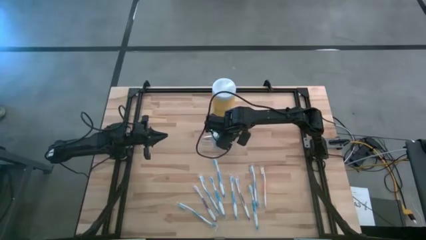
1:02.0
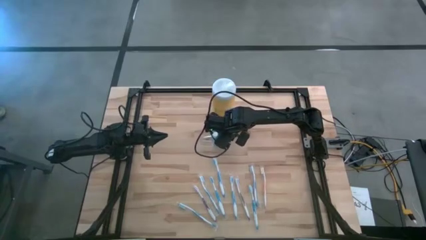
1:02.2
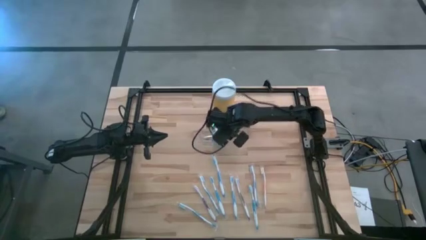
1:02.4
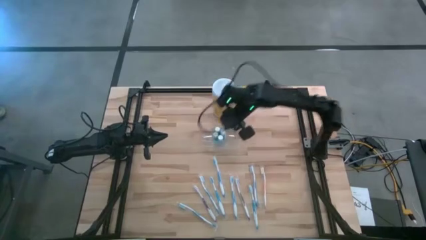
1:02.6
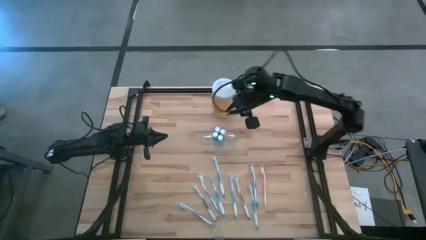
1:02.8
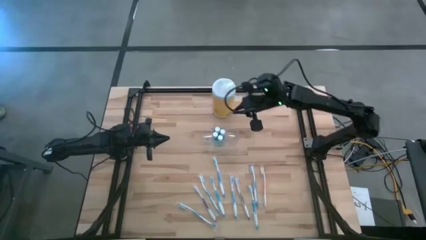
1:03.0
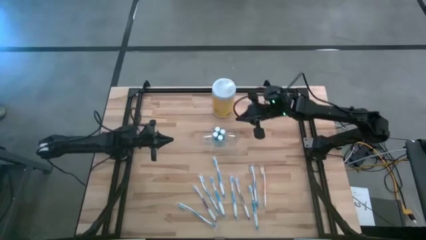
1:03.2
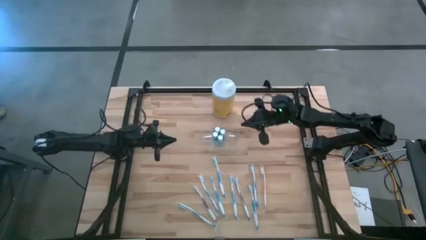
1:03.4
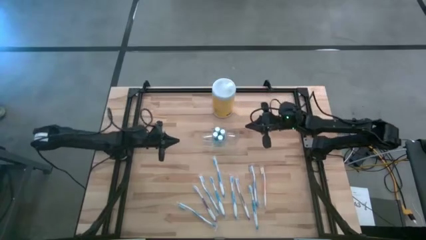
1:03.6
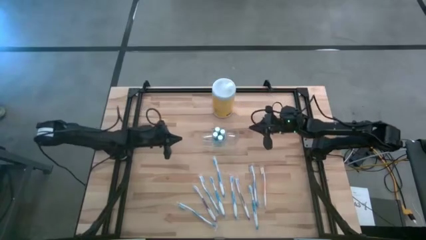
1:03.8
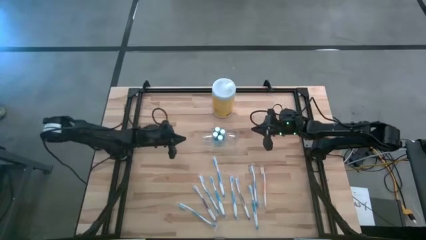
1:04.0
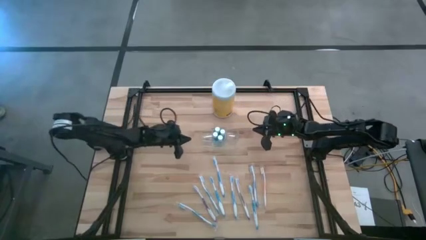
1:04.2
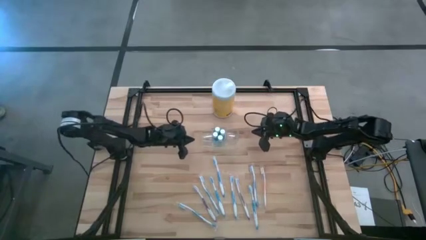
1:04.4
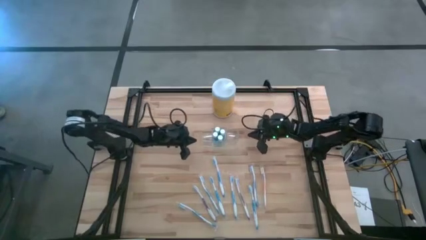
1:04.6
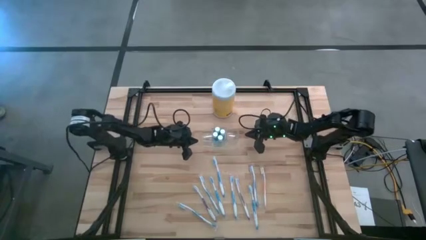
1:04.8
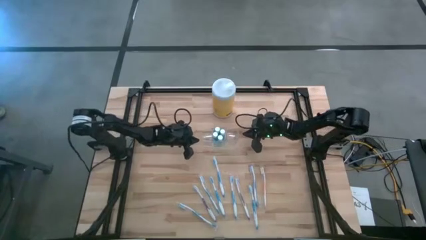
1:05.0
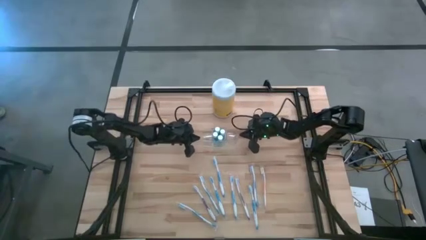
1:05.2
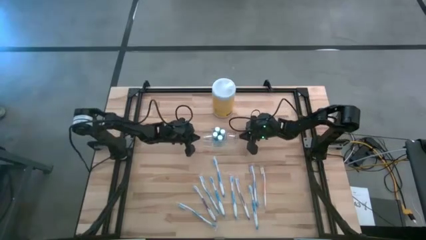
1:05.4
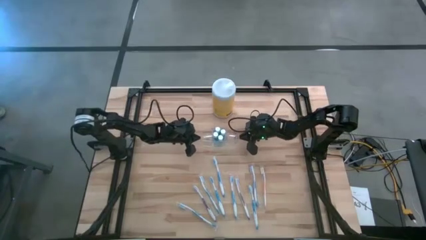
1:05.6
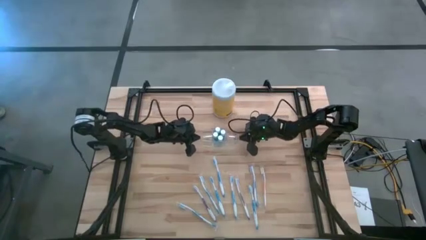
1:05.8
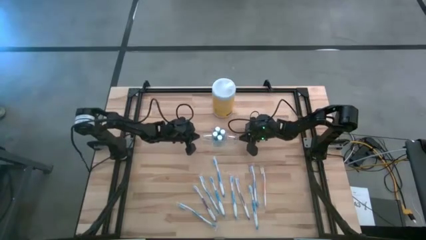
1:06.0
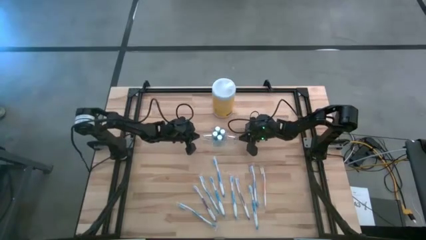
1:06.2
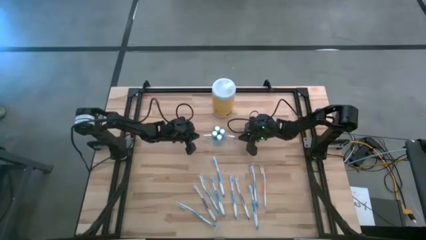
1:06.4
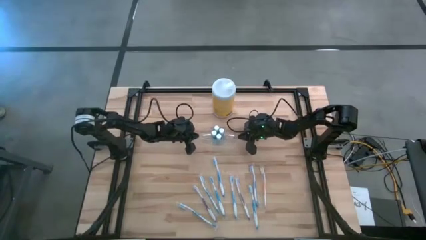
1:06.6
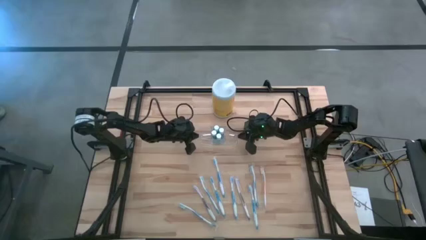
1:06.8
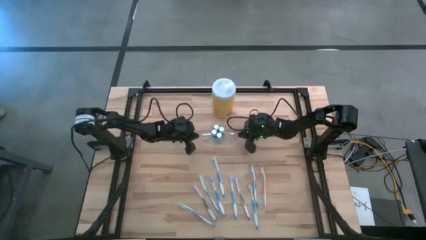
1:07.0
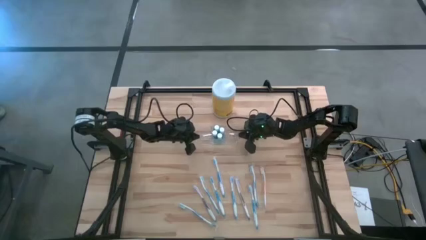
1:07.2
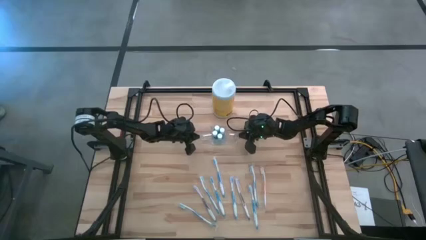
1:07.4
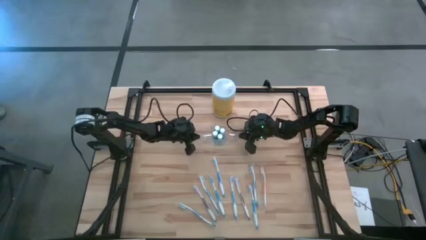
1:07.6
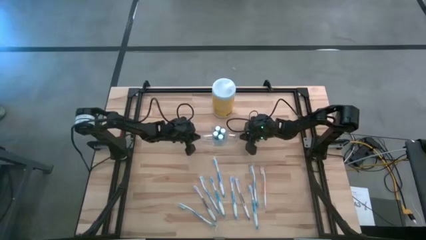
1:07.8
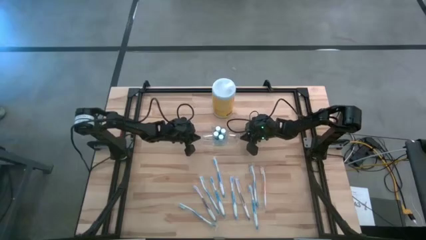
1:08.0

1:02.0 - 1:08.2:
Task: Pick & Place toothbrushing station
Adjust the transparent organizer

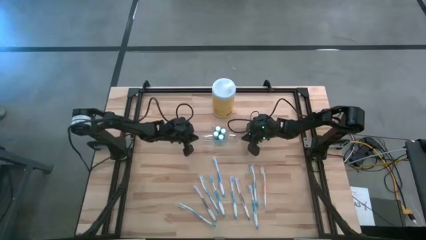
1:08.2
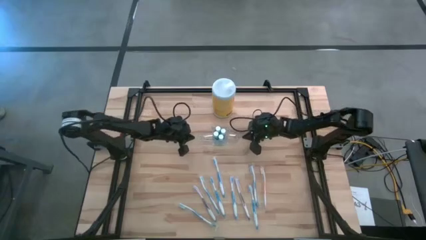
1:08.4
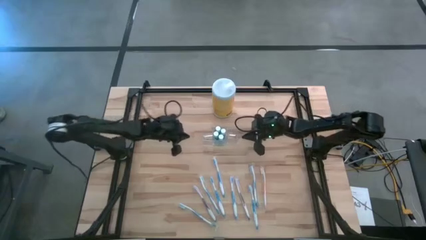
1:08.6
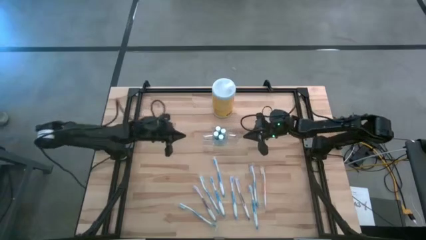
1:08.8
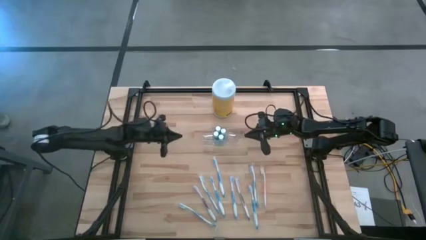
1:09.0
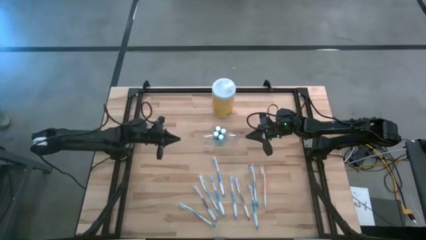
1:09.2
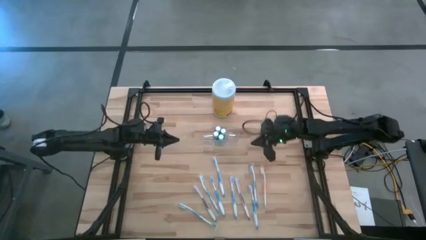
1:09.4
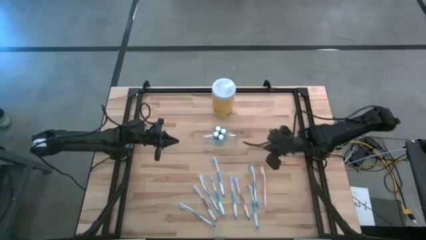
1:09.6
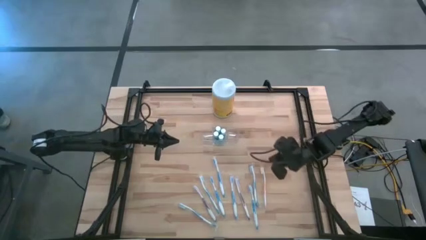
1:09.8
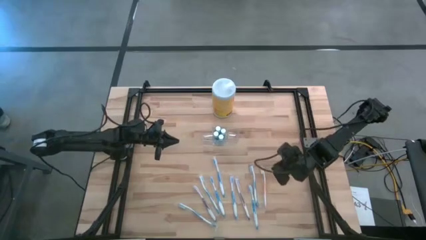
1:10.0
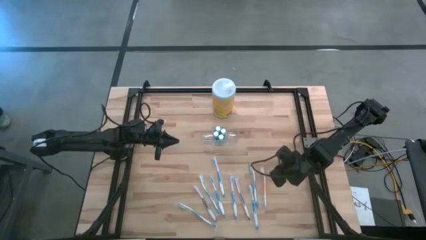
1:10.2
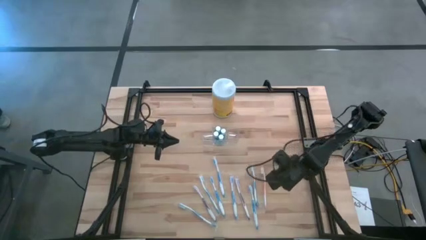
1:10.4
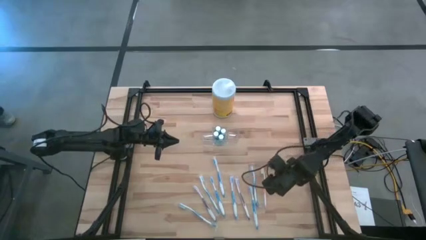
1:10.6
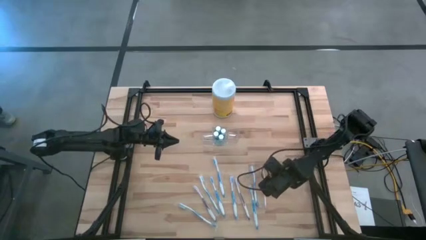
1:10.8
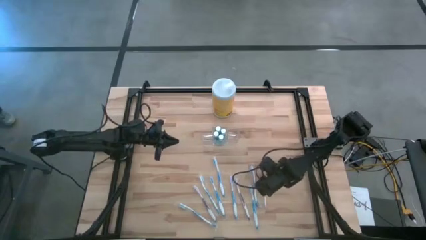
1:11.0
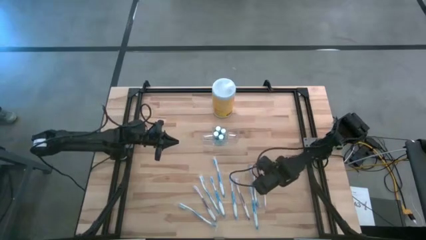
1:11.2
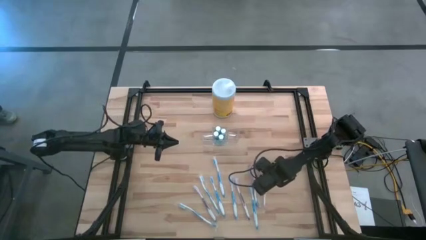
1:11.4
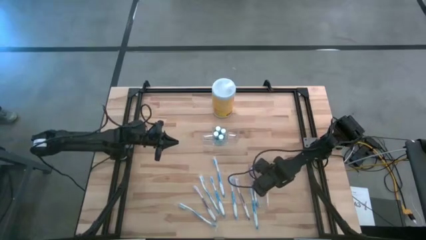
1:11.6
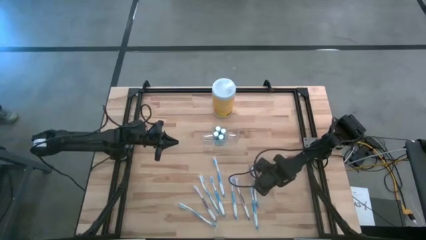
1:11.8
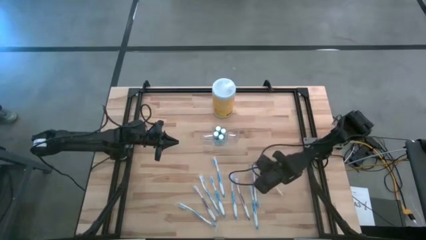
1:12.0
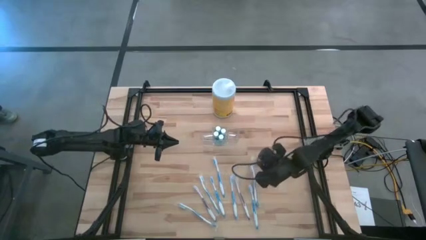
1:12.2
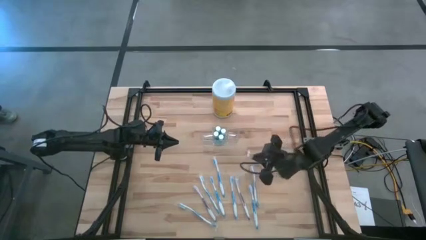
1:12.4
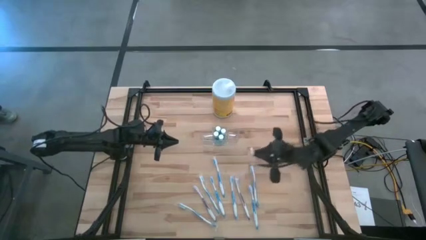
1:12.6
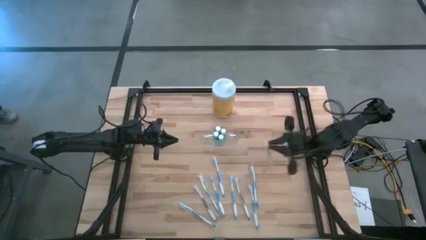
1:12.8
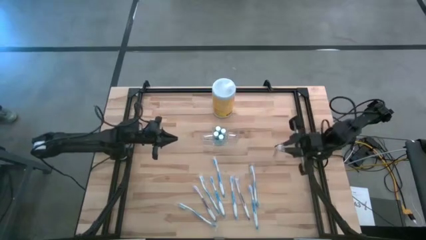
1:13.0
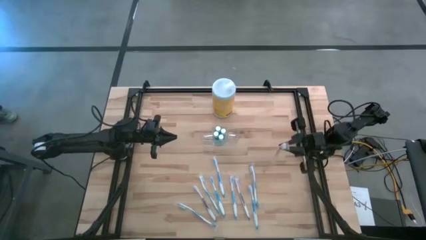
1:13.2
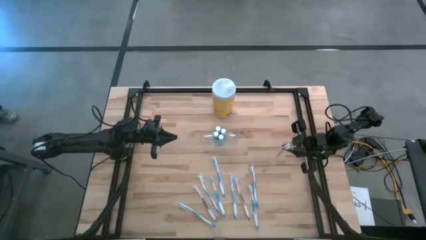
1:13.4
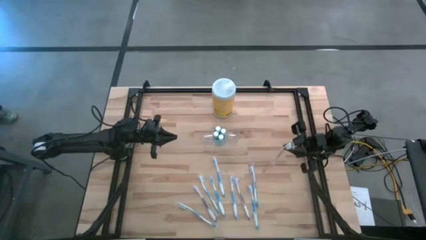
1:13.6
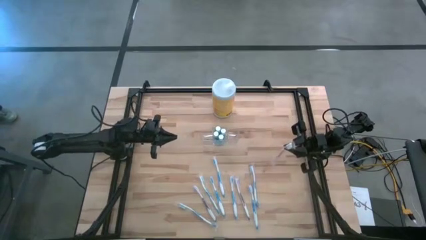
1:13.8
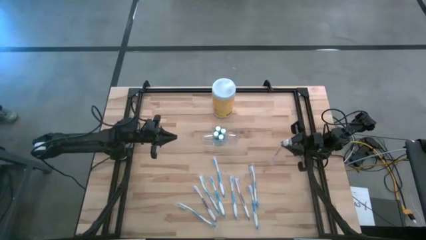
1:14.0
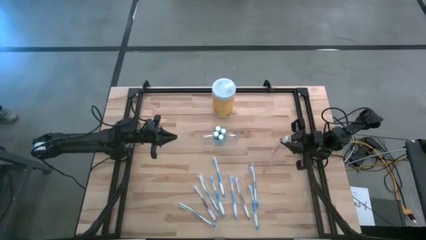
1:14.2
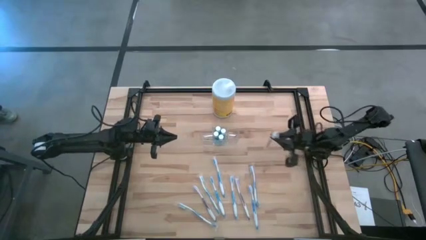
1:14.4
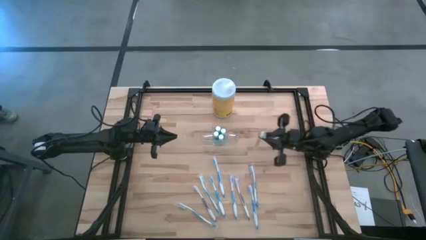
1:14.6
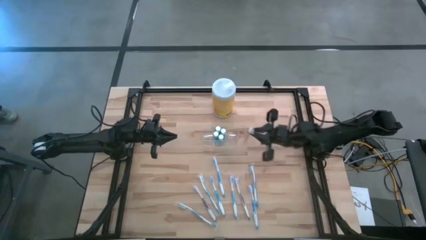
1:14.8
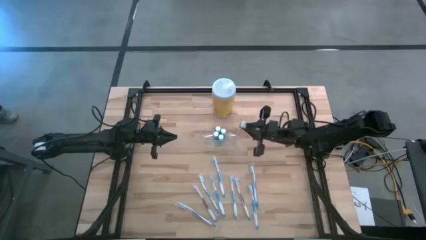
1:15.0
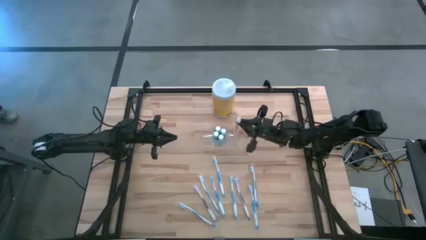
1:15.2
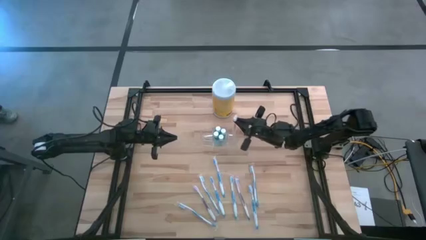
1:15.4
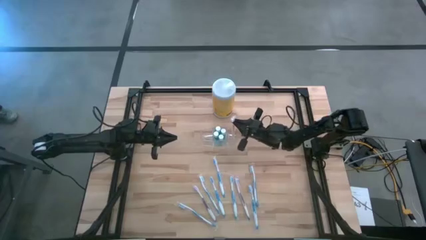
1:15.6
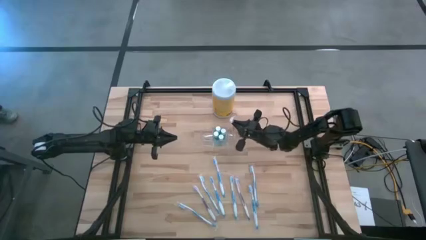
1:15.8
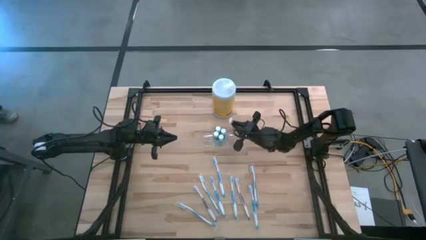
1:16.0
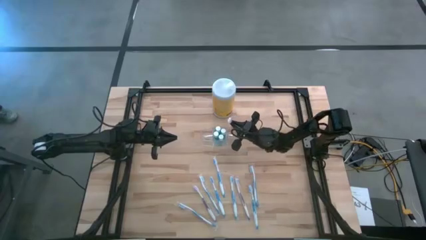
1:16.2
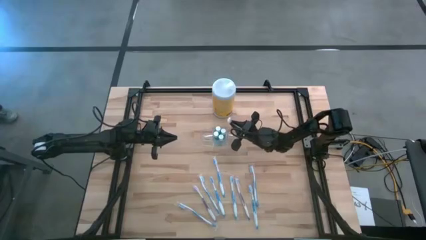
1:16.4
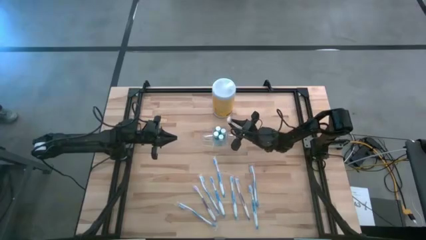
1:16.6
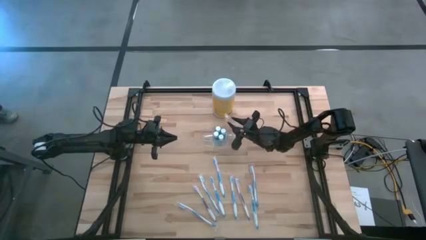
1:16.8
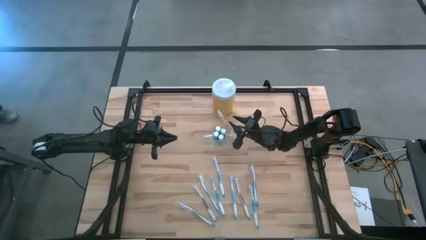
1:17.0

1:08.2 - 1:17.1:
Put the orange toothbrush into the transparent organizer
